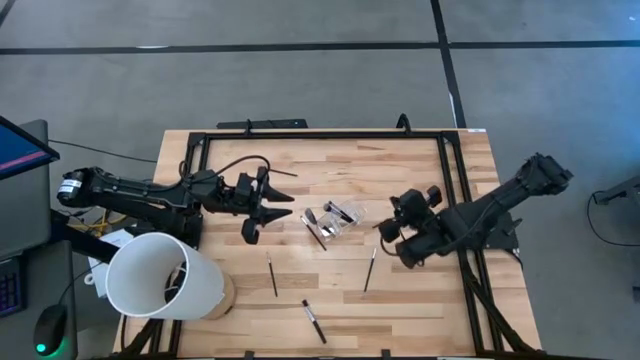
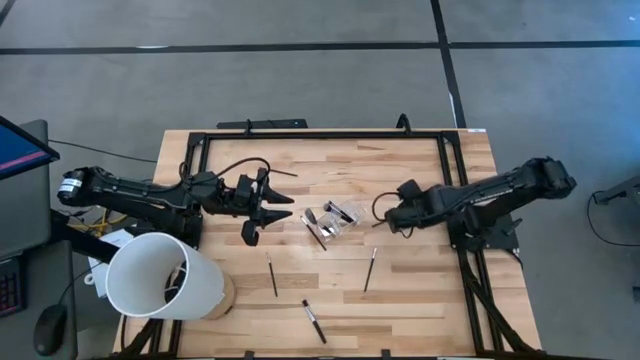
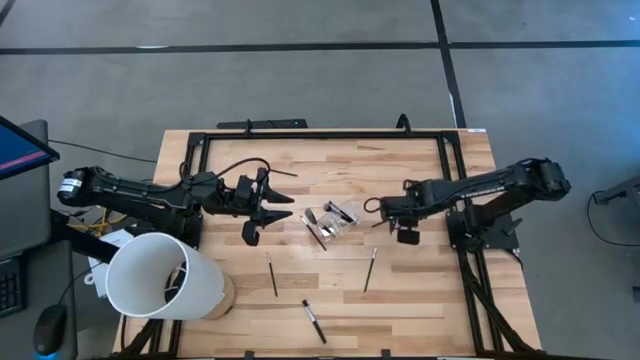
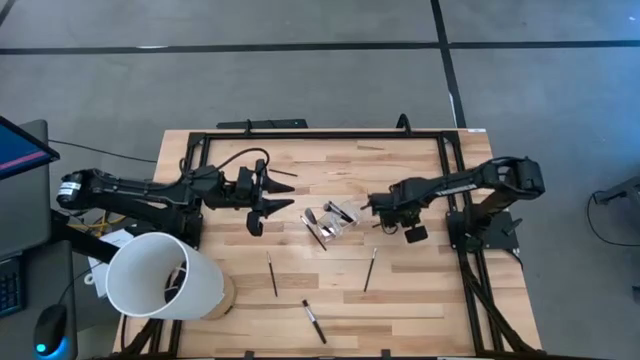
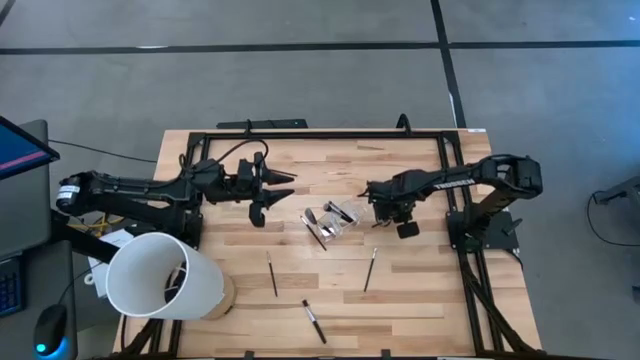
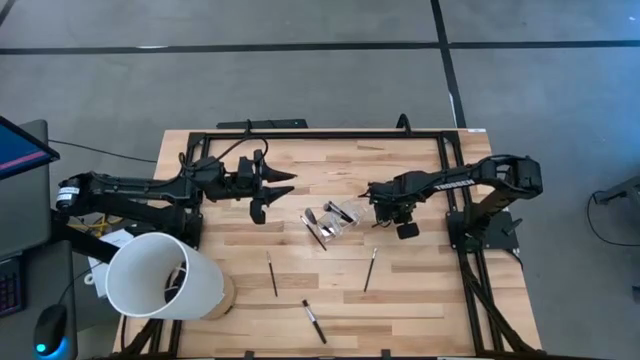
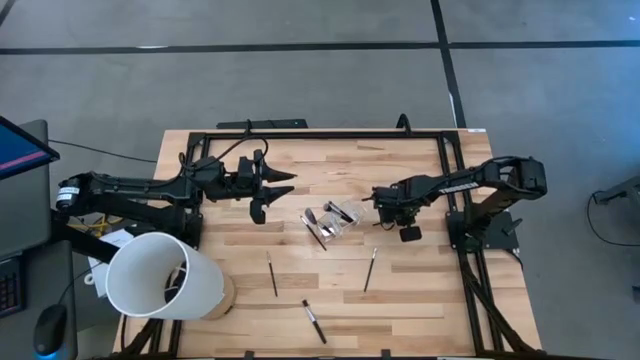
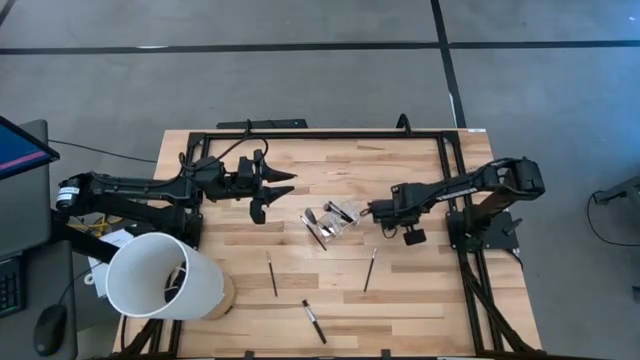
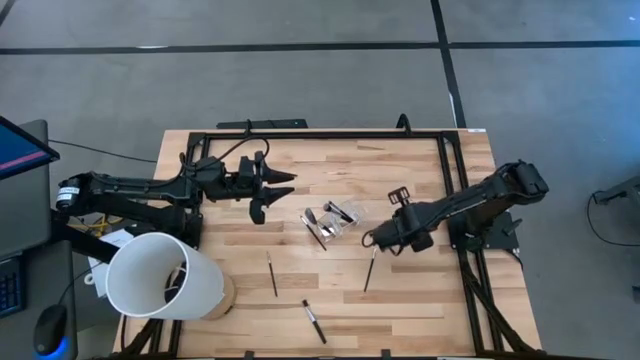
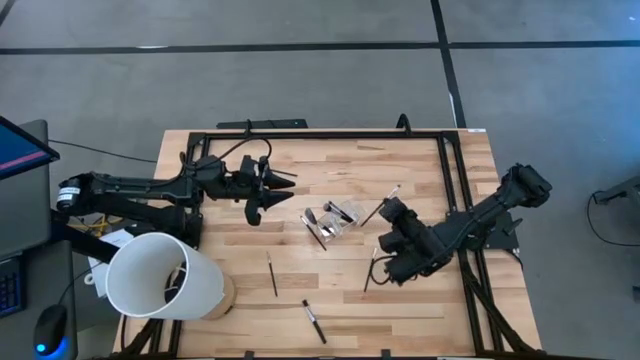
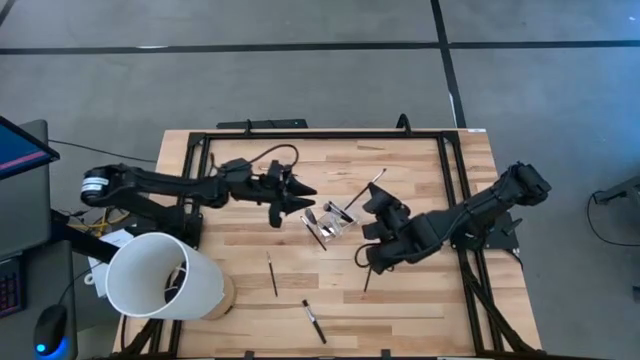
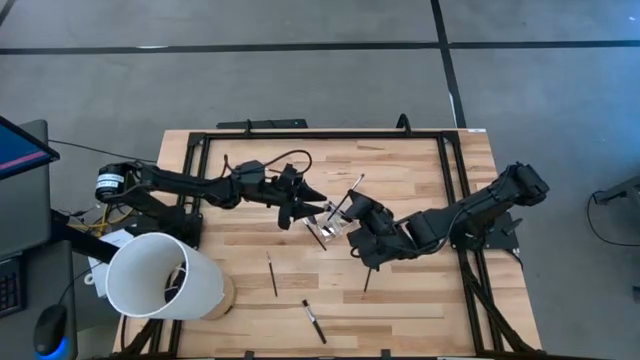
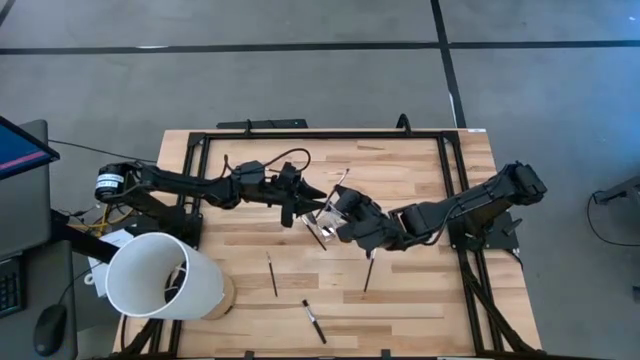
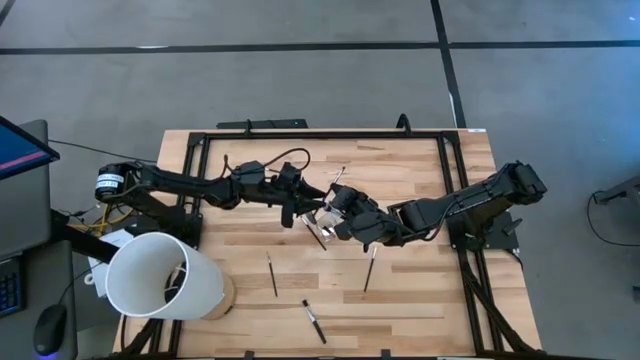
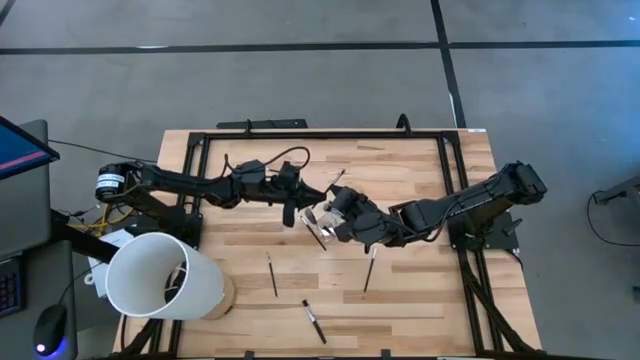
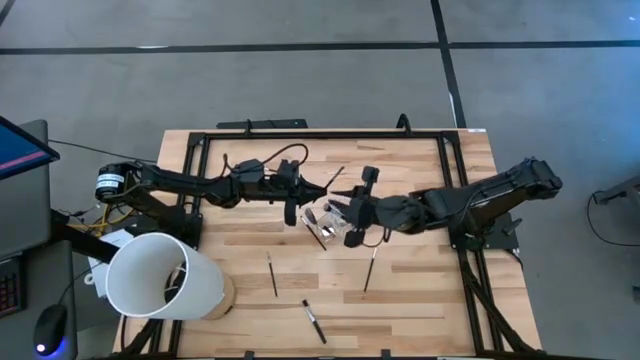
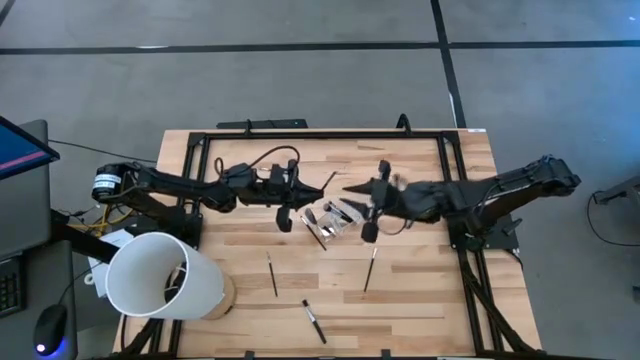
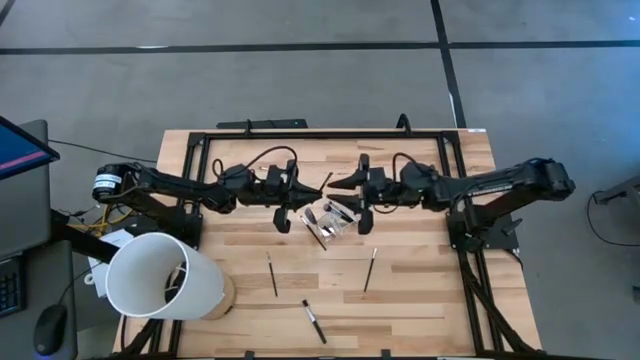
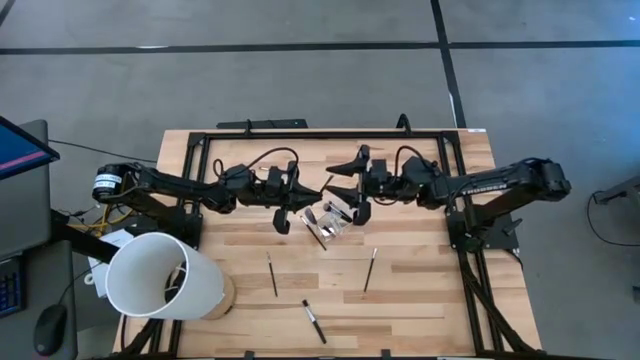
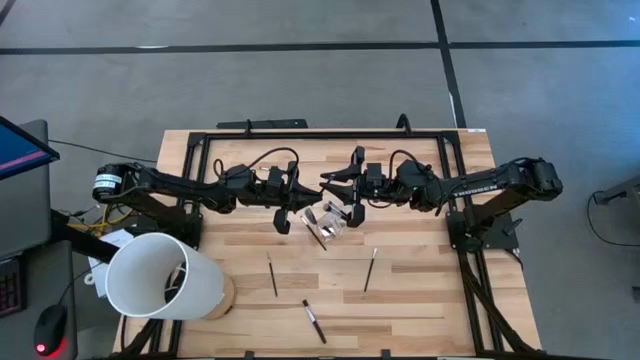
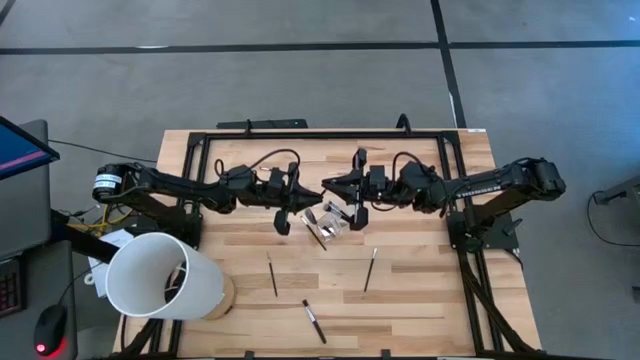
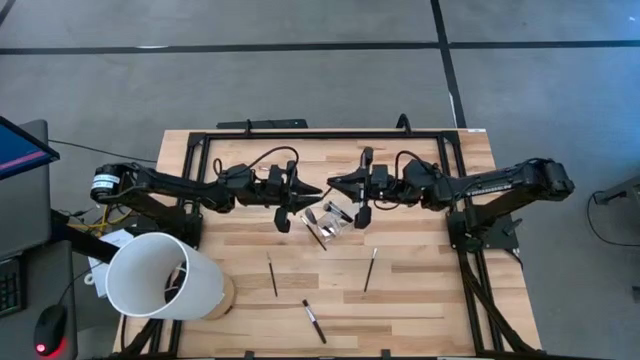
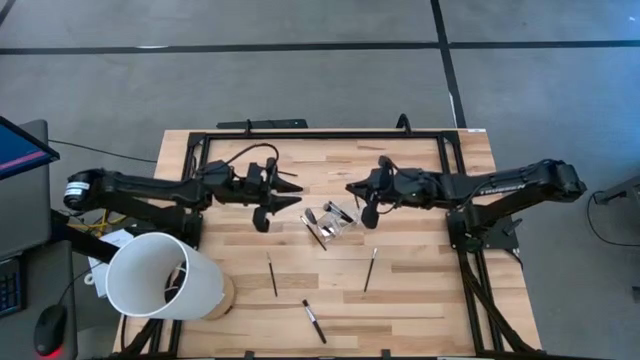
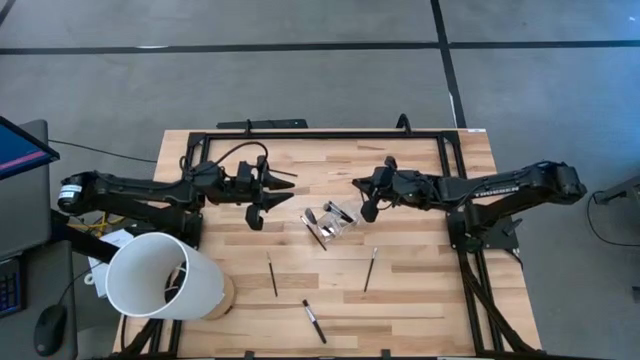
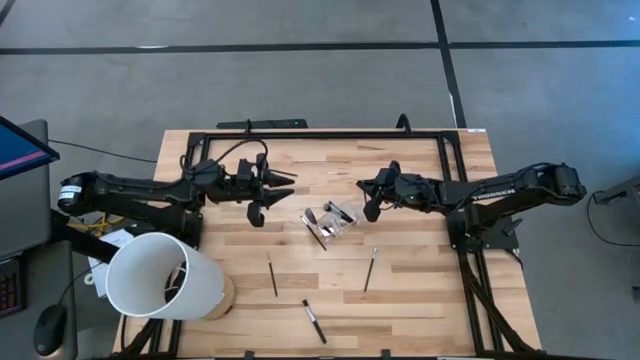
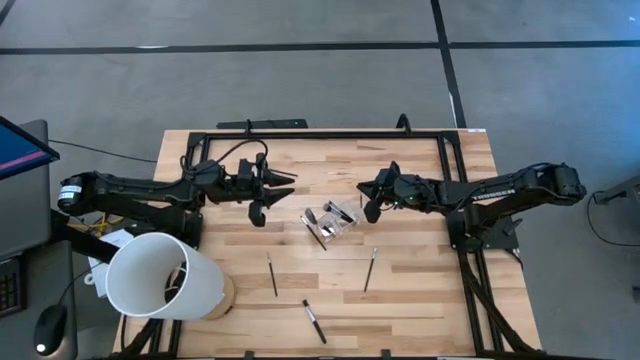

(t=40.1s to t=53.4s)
Task: Put items in baskets/containers
Put the black foundation brush into the transparent organizer

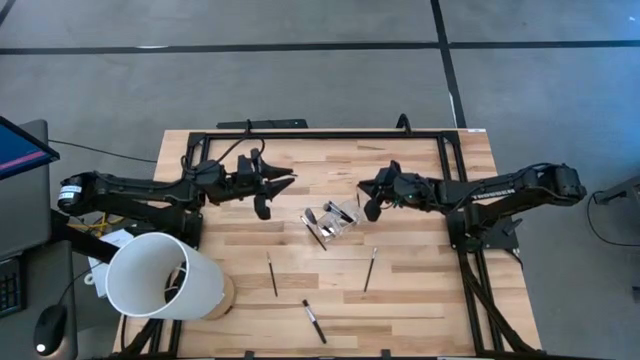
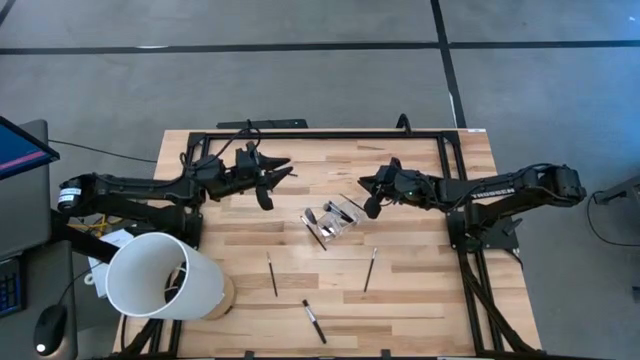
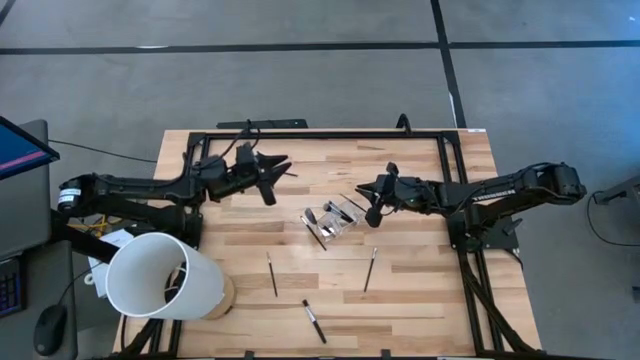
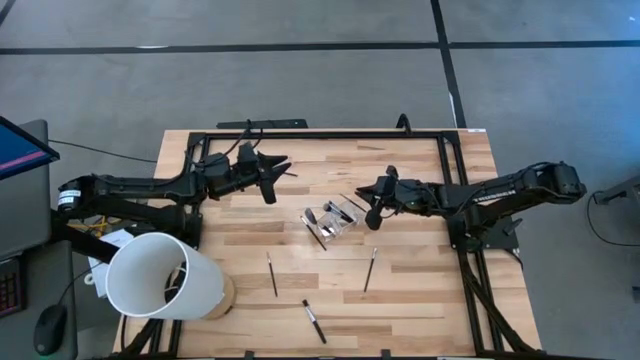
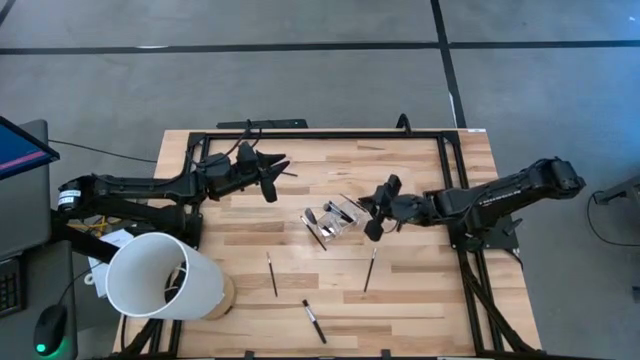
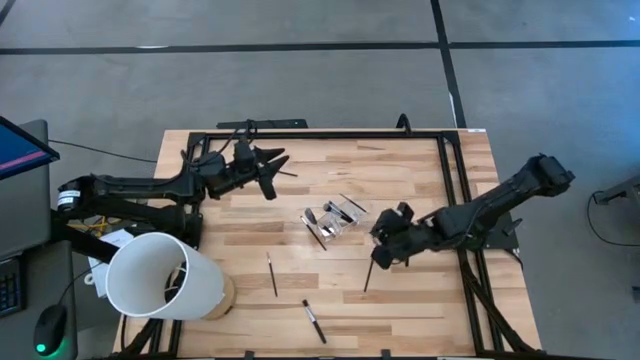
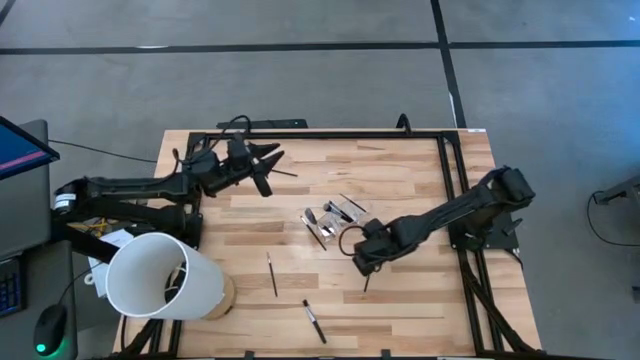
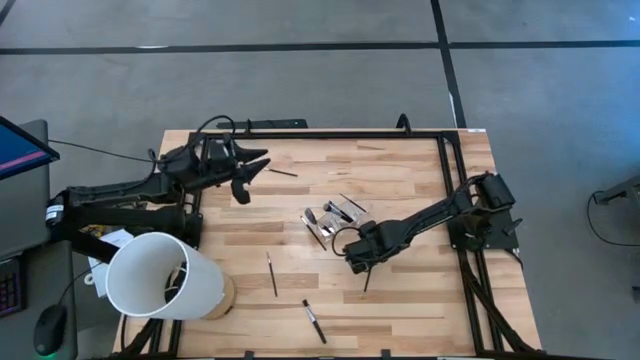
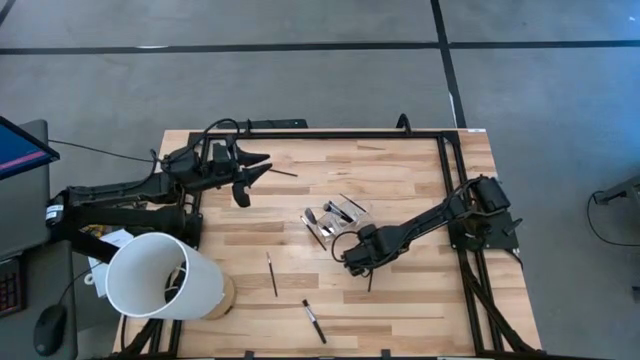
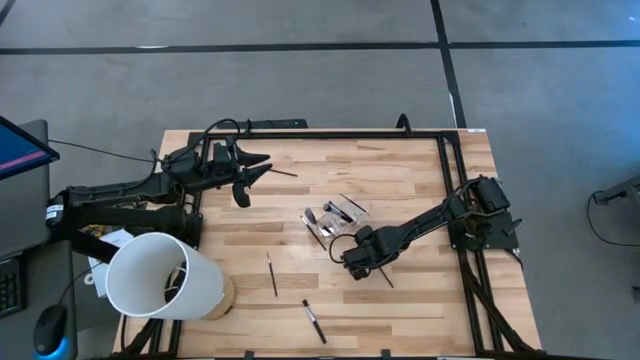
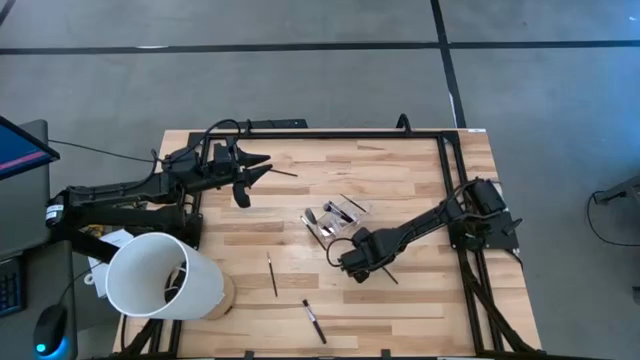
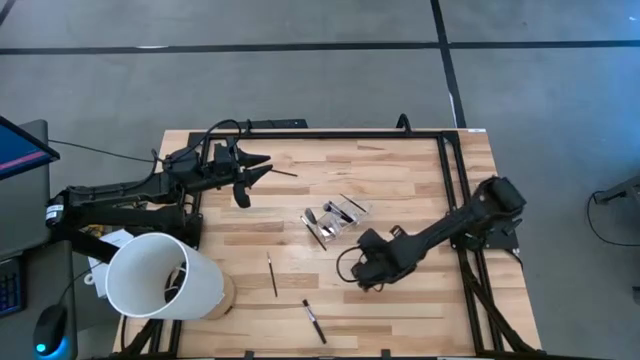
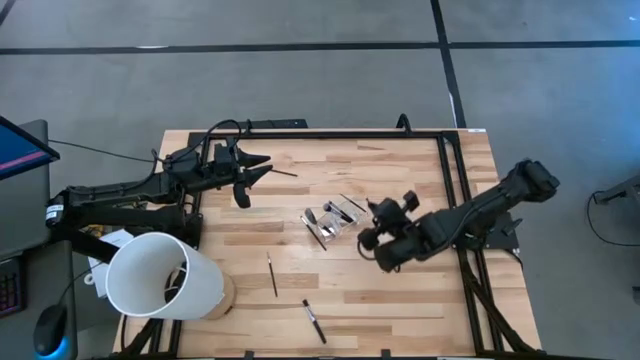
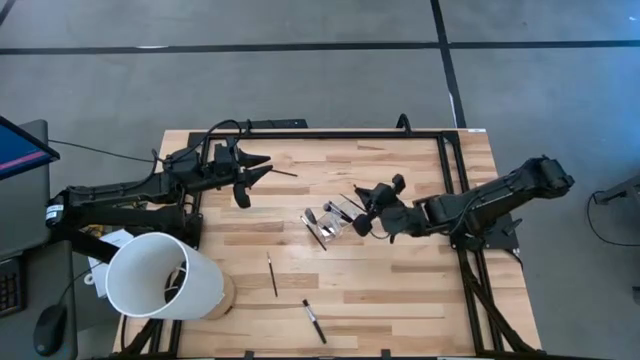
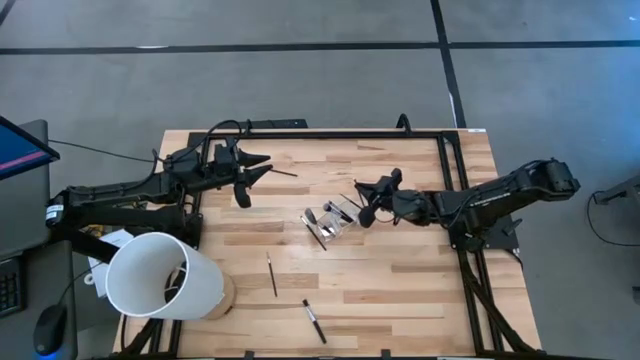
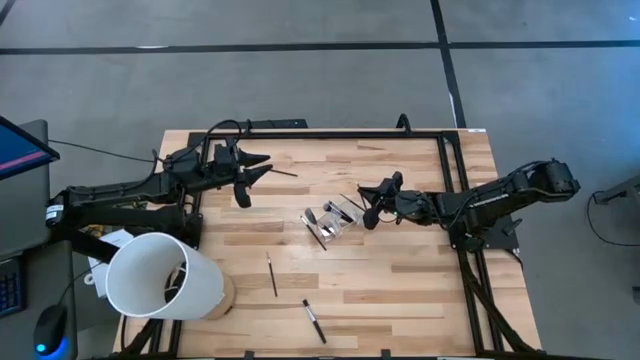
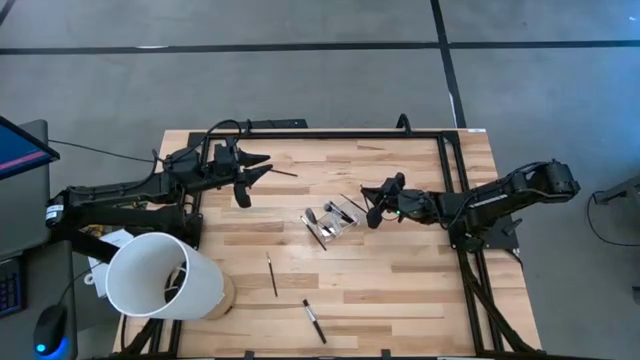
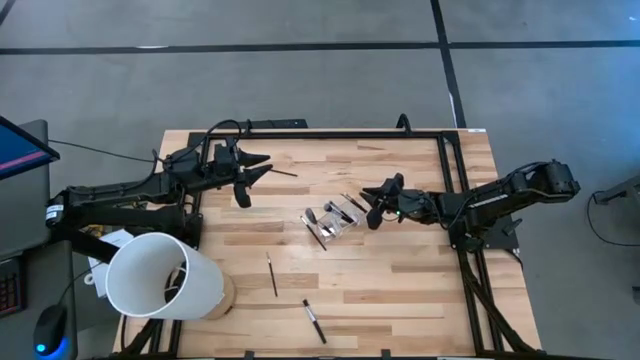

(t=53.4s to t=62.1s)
Put the white eyeshadow brush into the transparent organizer
